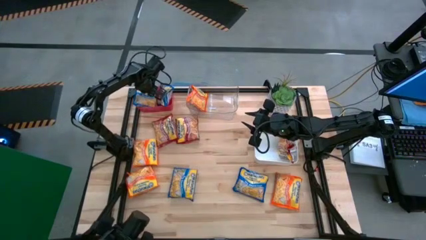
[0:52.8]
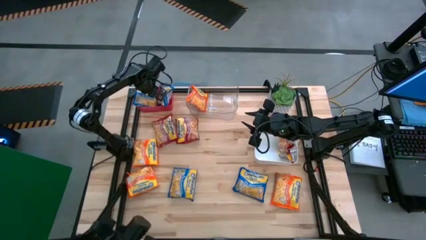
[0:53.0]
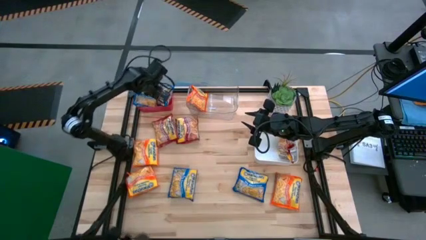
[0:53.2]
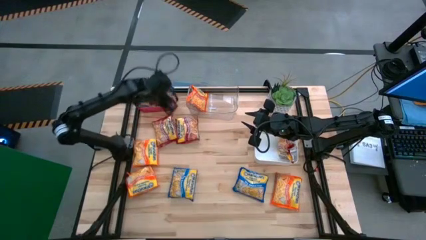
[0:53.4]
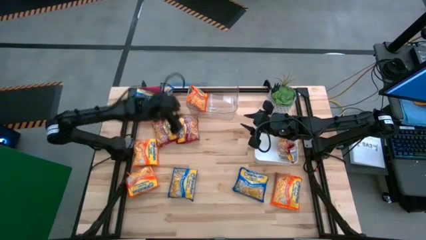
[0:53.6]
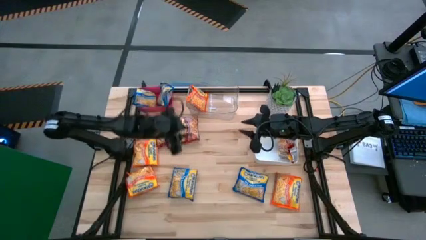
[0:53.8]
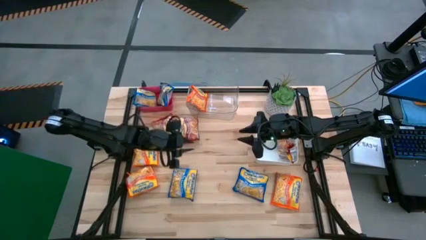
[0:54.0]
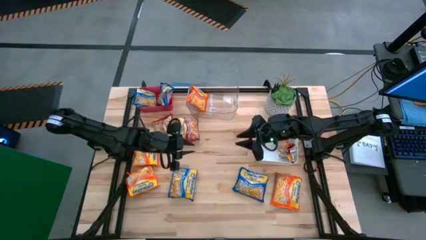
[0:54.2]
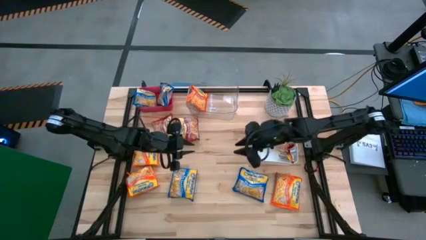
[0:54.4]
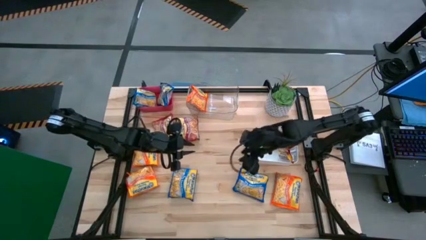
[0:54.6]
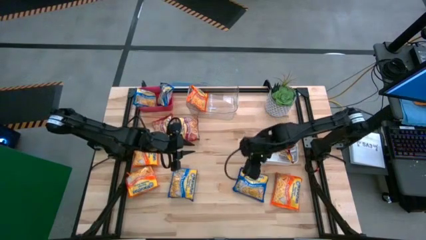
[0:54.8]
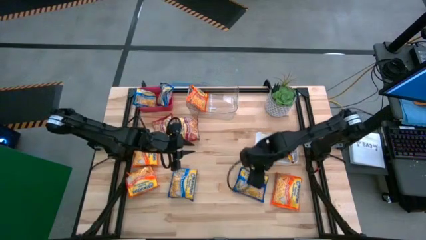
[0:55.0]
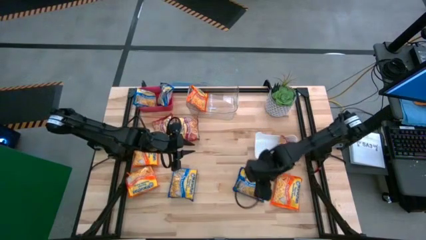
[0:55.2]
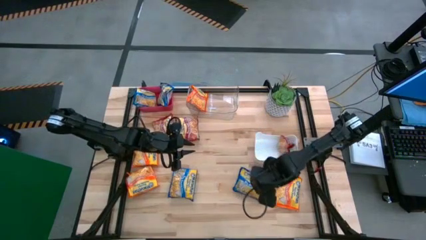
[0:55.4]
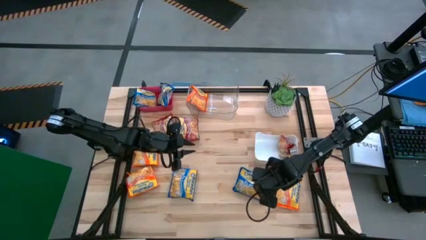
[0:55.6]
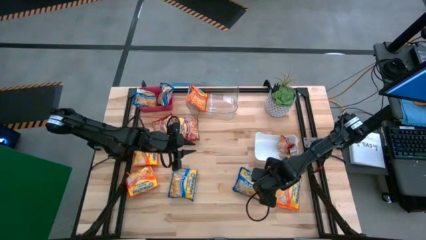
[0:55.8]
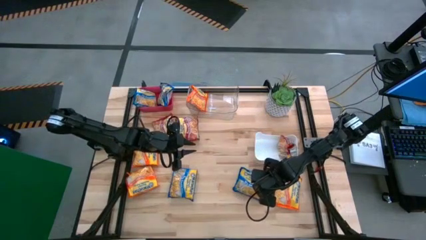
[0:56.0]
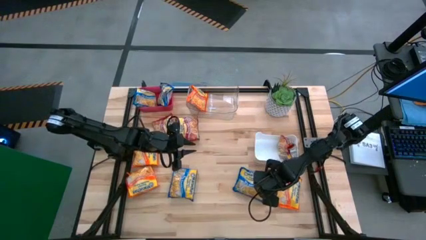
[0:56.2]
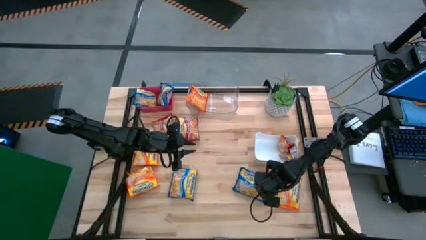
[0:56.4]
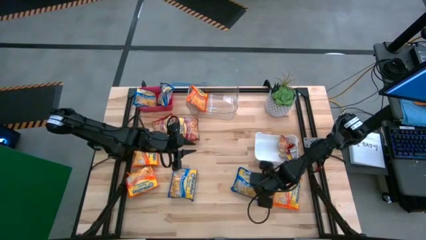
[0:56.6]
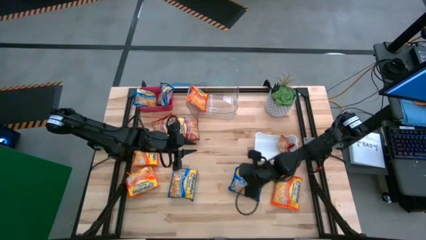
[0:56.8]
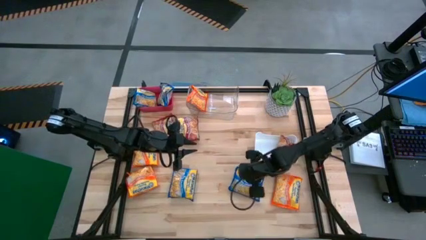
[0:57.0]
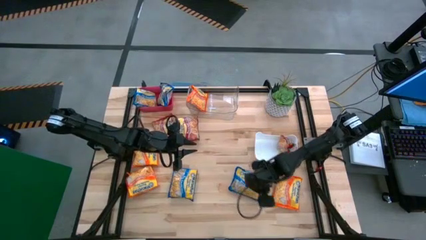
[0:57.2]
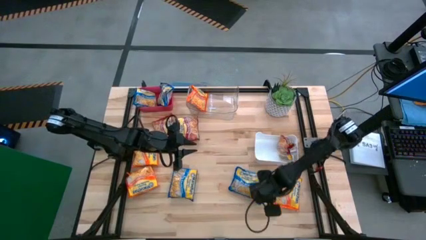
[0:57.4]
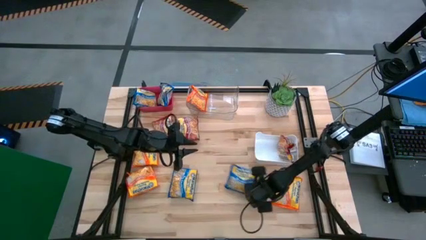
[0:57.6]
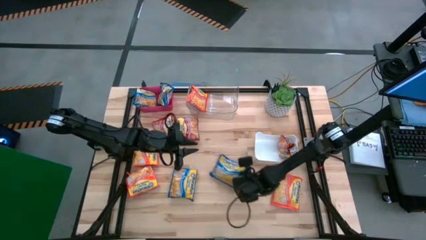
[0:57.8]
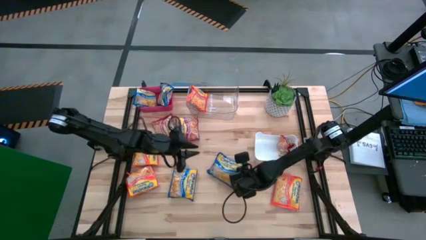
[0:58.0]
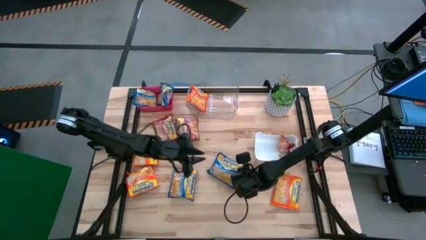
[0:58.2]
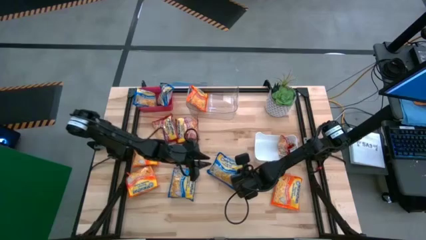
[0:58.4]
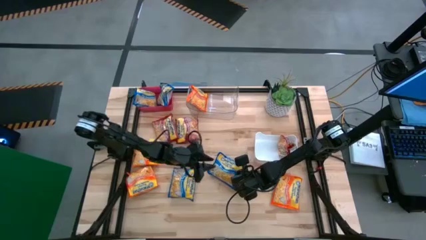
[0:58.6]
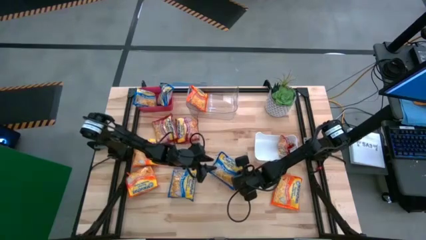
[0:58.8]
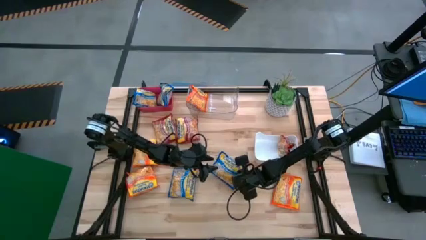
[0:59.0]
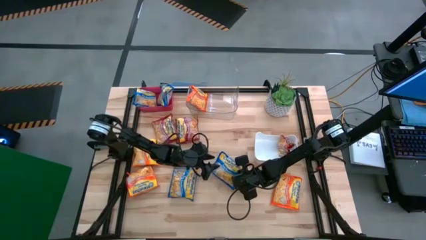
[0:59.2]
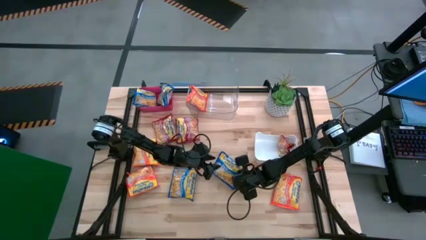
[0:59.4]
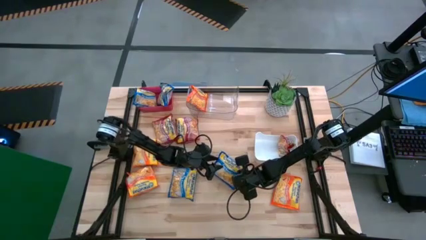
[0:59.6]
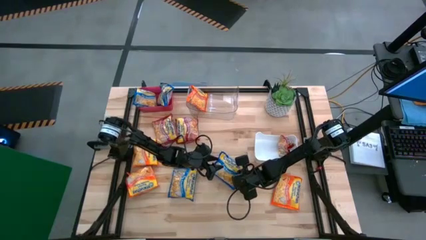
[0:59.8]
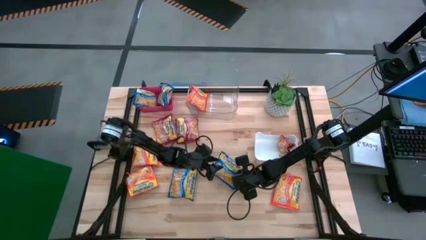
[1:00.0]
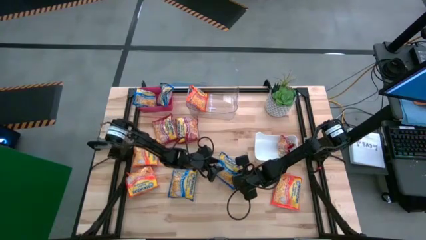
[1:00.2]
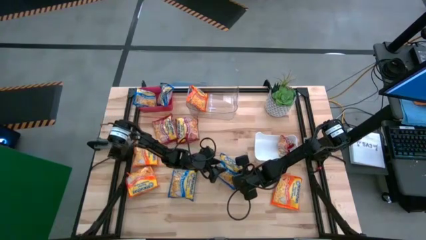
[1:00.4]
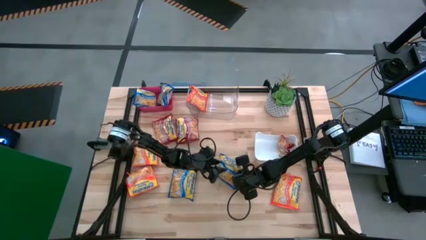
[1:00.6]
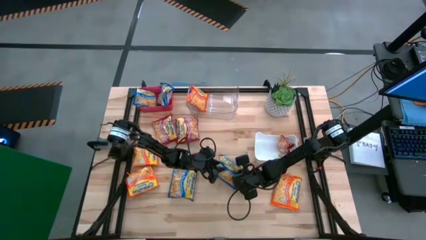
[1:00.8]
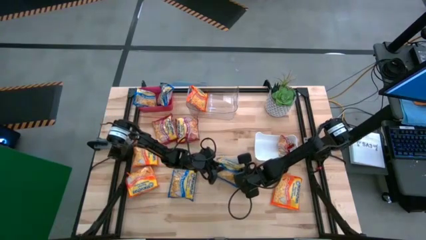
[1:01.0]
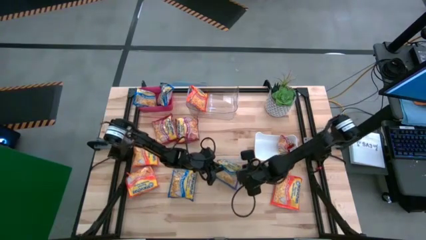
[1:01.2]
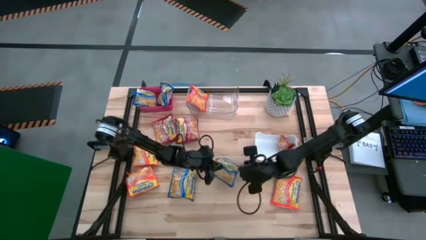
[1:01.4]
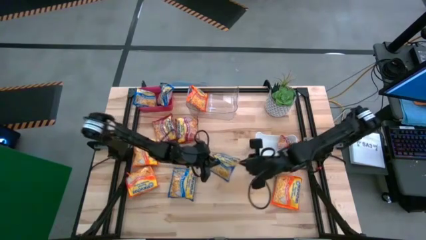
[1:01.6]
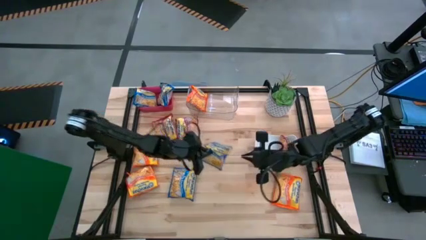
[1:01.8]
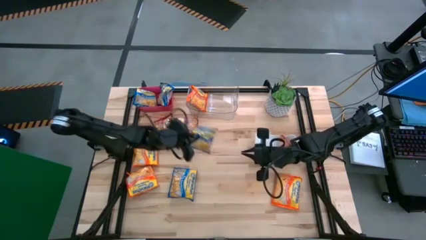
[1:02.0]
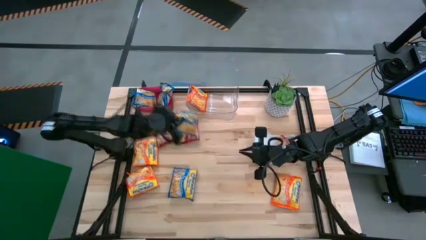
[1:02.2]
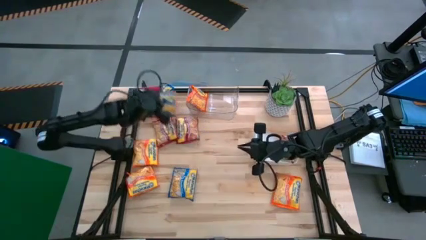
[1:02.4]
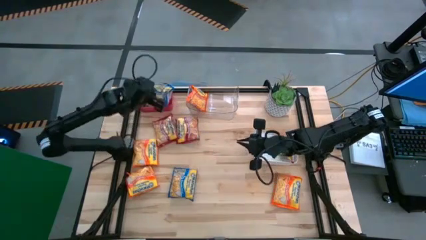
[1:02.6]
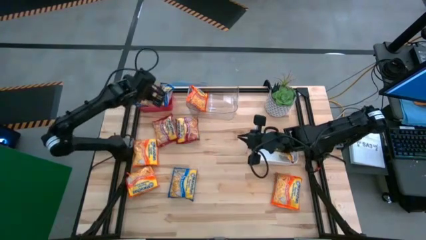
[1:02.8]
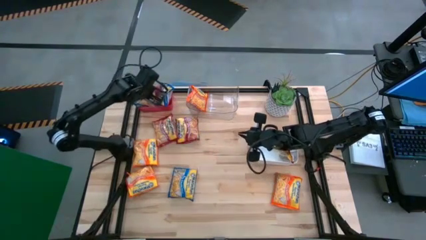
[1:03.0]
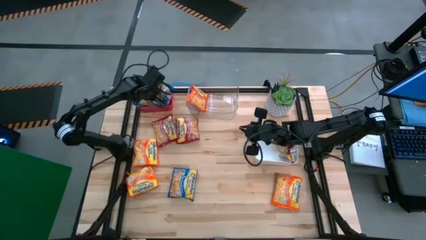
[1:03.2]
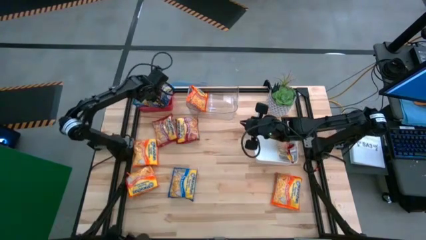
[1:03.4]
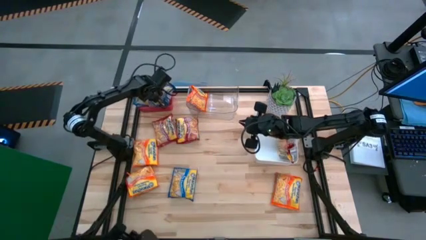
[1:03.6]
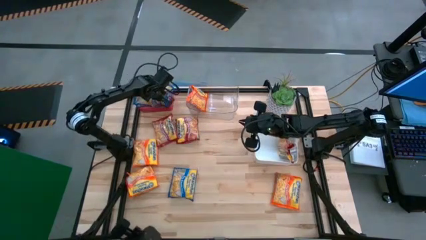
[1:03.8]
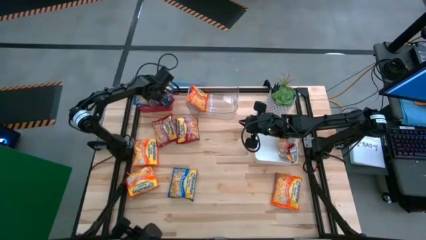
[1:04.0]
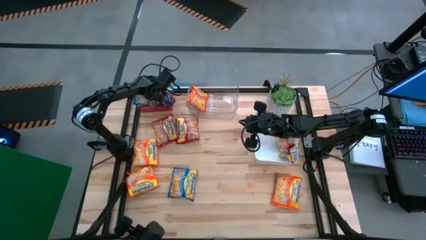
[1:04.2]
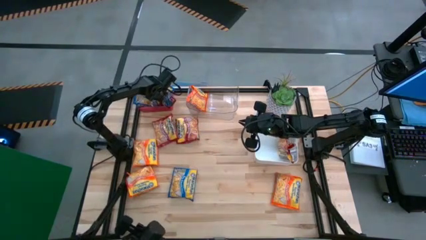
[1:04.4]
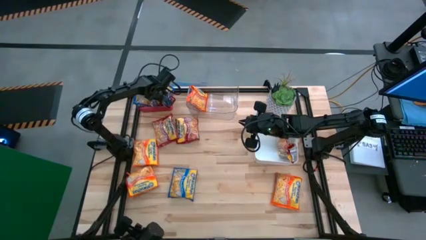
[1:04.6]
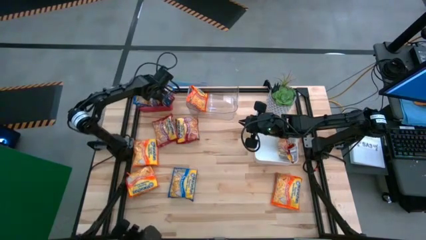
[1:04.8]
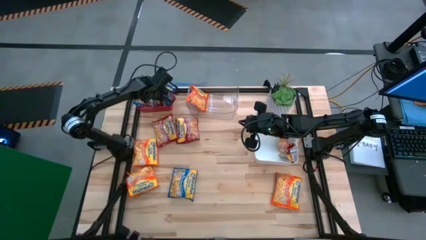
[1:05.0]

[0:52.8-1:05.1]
Task: Sort Maruchan noodles
Put the blue noodle pack into the red bin
